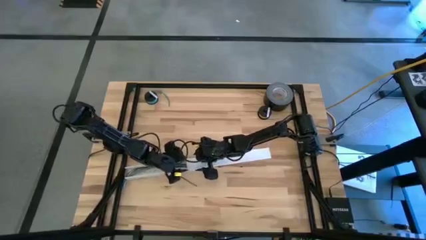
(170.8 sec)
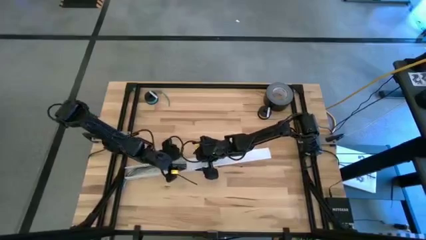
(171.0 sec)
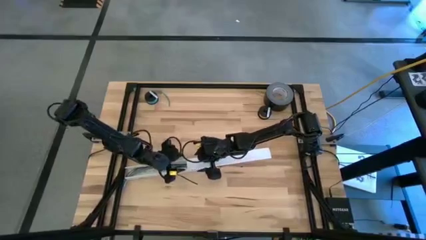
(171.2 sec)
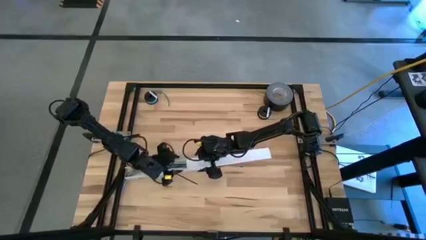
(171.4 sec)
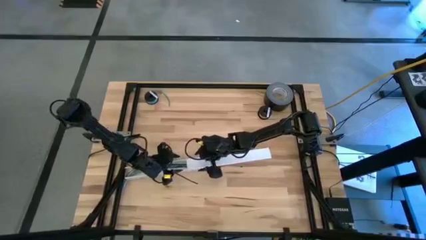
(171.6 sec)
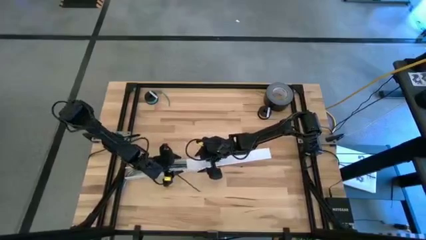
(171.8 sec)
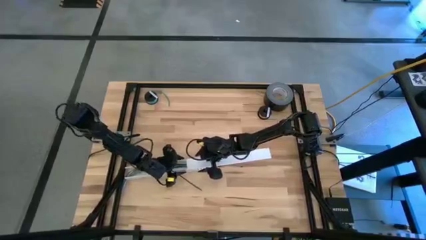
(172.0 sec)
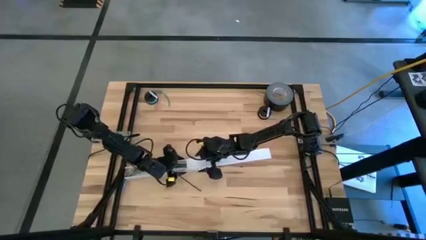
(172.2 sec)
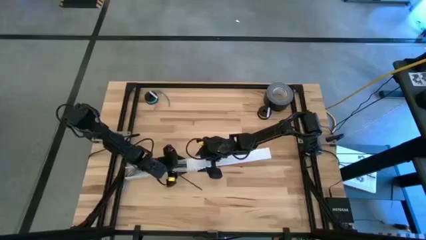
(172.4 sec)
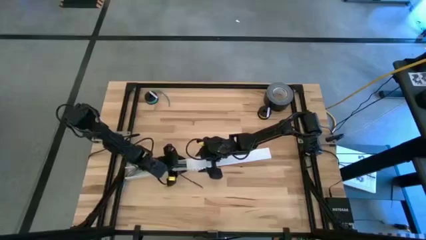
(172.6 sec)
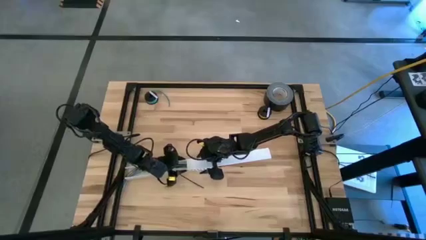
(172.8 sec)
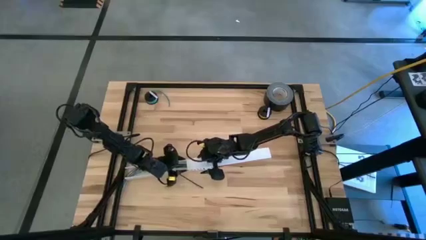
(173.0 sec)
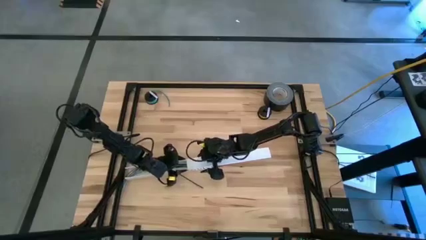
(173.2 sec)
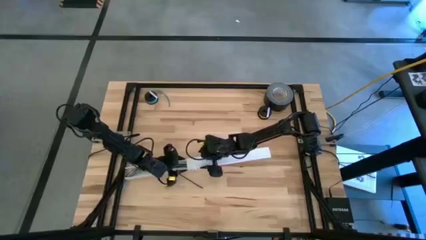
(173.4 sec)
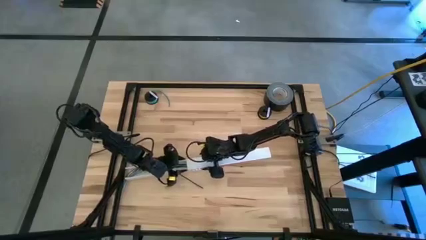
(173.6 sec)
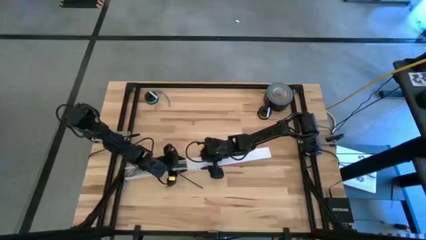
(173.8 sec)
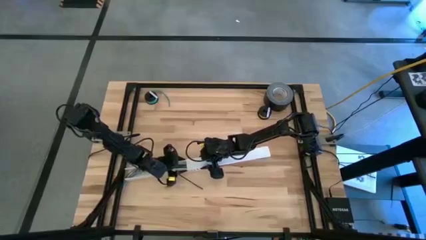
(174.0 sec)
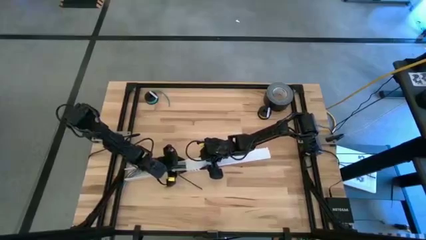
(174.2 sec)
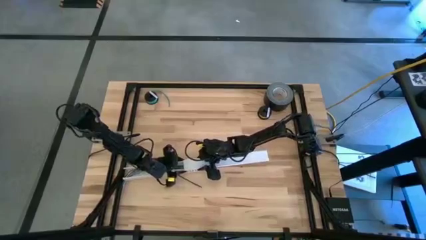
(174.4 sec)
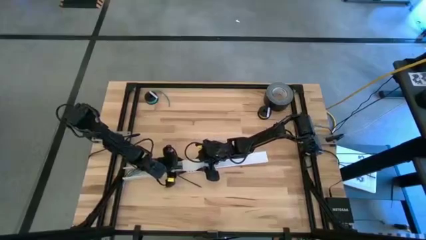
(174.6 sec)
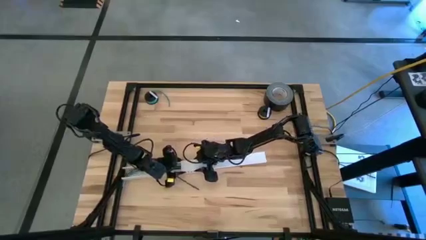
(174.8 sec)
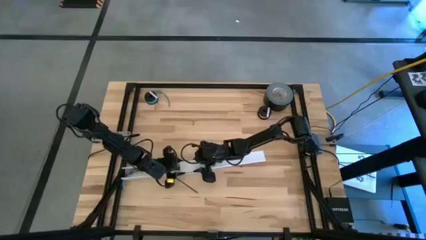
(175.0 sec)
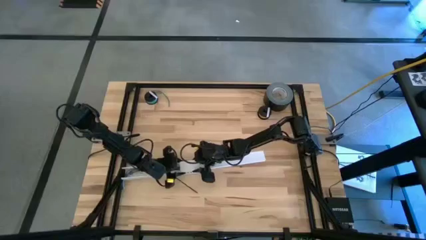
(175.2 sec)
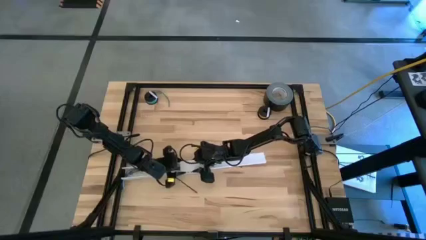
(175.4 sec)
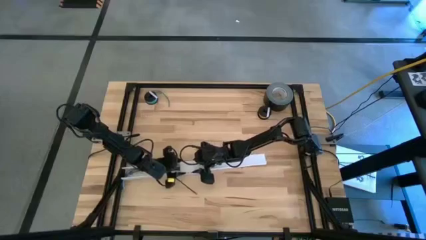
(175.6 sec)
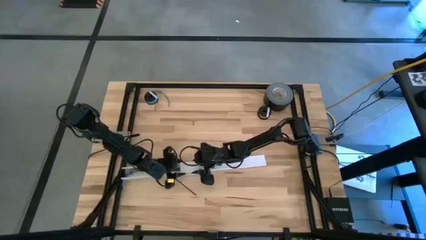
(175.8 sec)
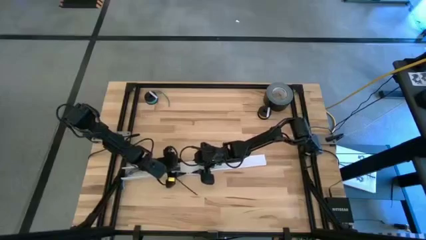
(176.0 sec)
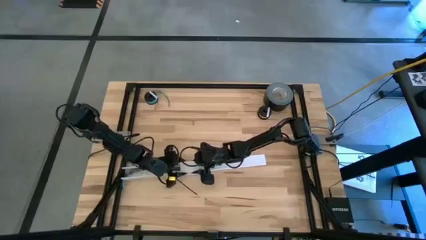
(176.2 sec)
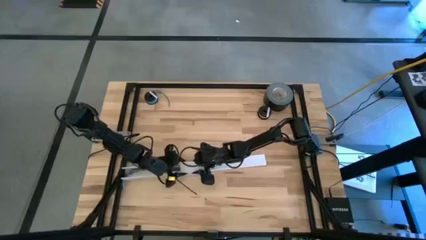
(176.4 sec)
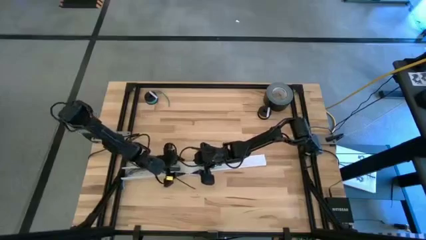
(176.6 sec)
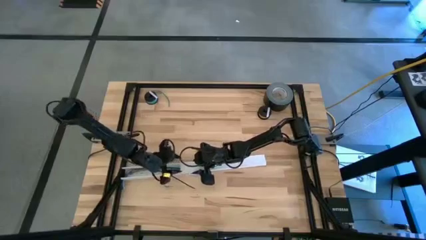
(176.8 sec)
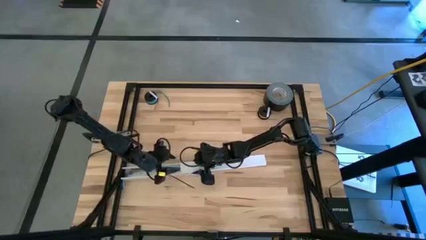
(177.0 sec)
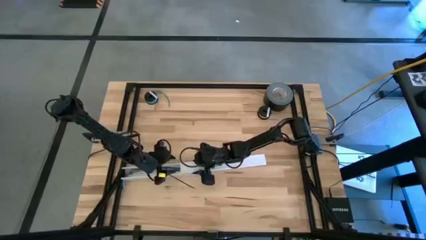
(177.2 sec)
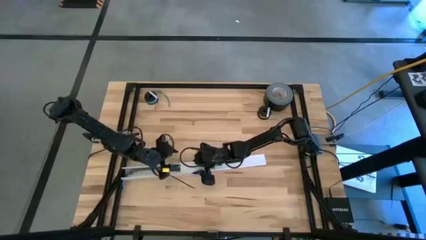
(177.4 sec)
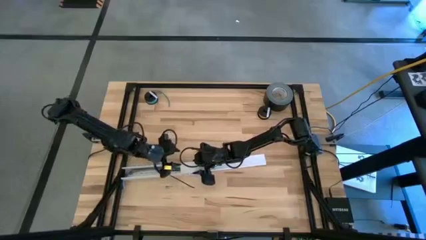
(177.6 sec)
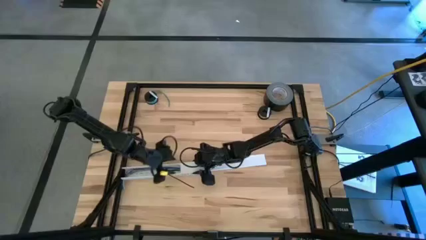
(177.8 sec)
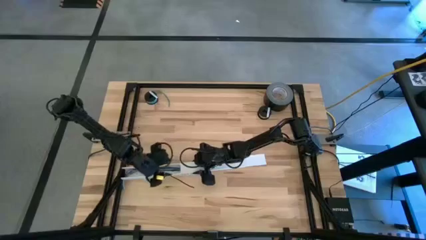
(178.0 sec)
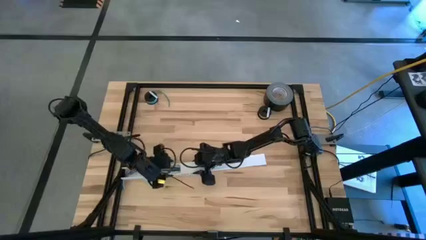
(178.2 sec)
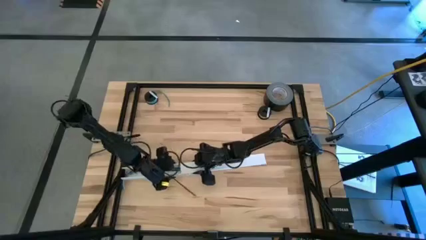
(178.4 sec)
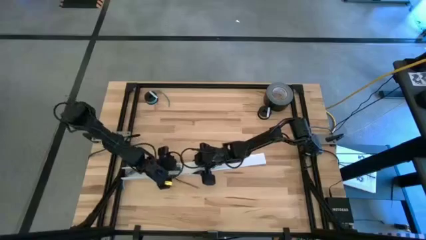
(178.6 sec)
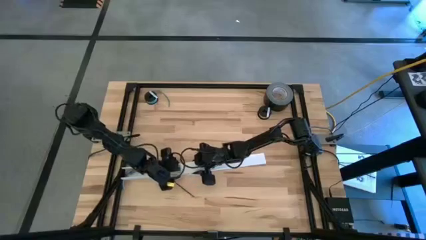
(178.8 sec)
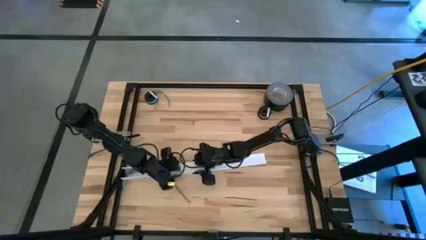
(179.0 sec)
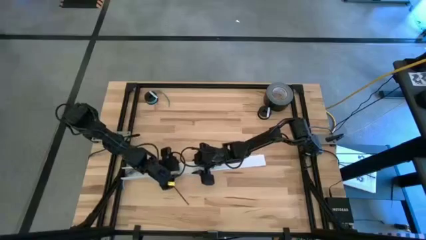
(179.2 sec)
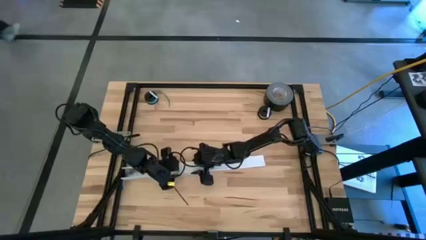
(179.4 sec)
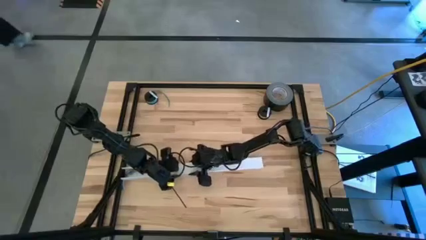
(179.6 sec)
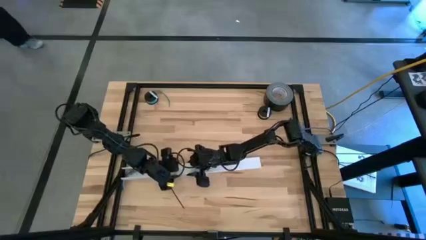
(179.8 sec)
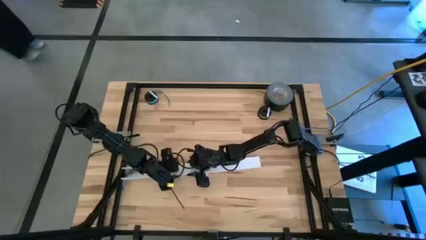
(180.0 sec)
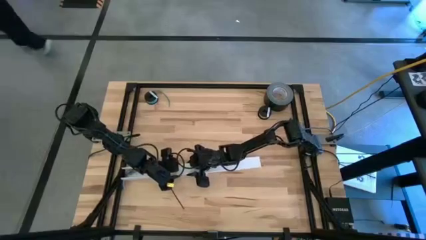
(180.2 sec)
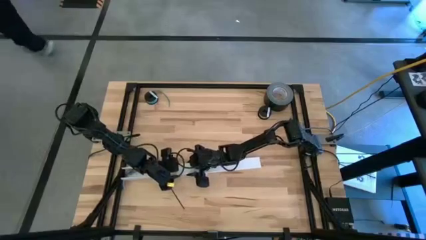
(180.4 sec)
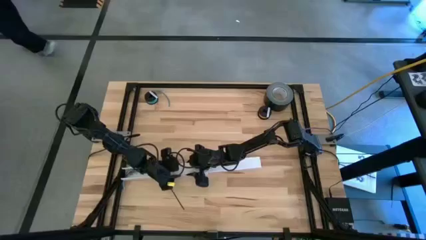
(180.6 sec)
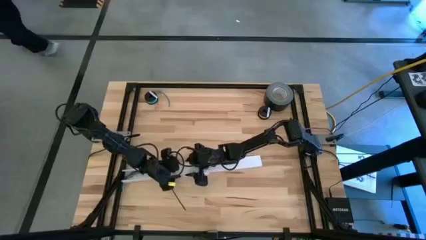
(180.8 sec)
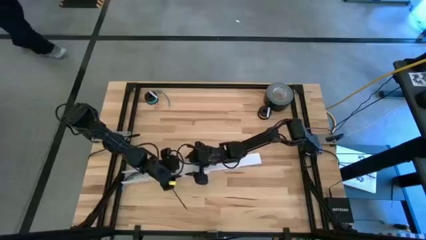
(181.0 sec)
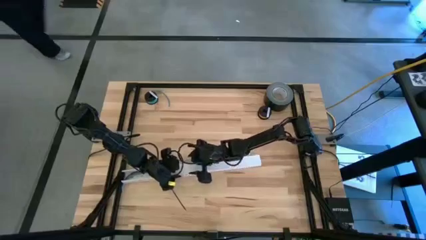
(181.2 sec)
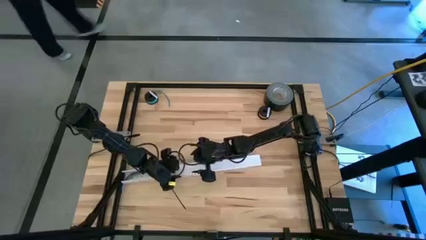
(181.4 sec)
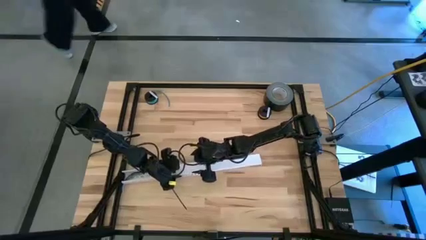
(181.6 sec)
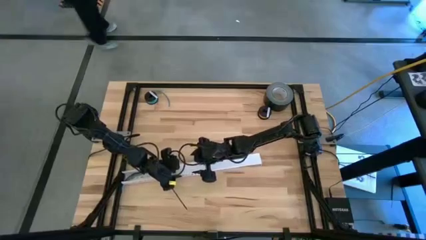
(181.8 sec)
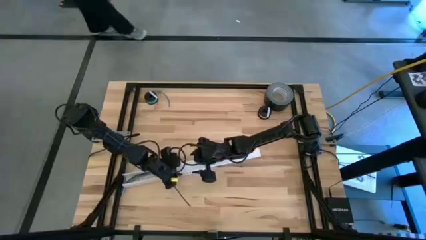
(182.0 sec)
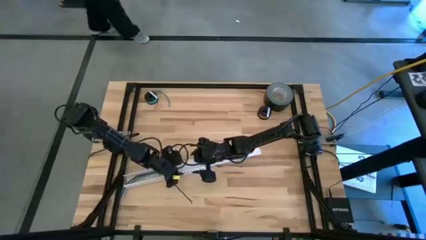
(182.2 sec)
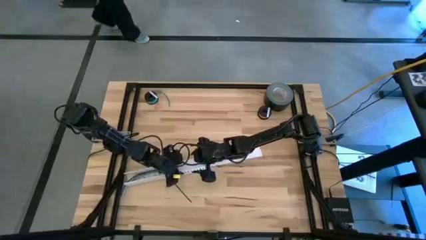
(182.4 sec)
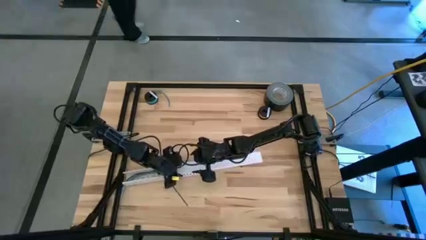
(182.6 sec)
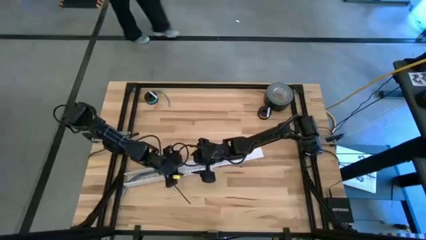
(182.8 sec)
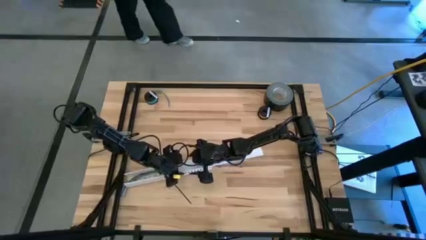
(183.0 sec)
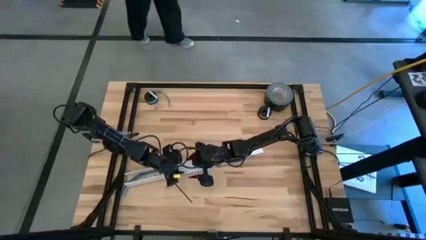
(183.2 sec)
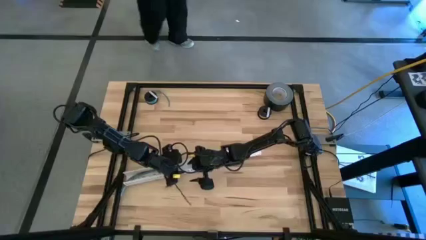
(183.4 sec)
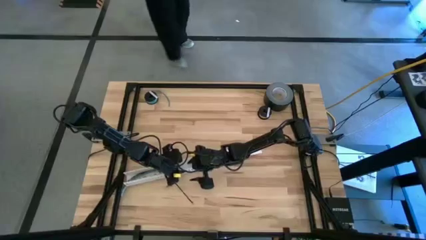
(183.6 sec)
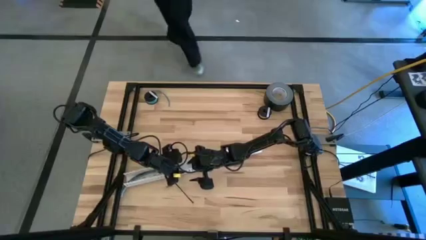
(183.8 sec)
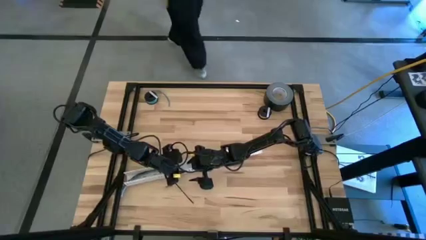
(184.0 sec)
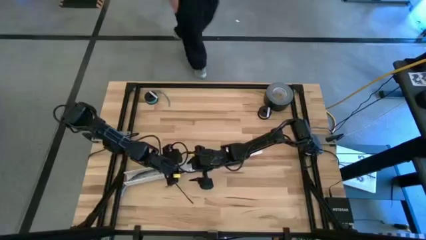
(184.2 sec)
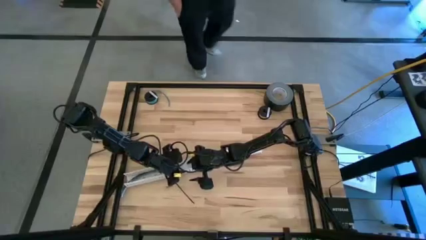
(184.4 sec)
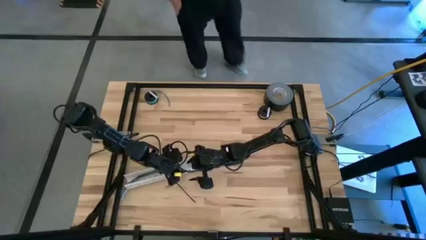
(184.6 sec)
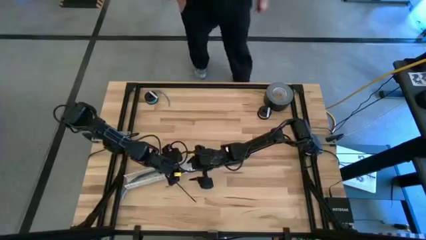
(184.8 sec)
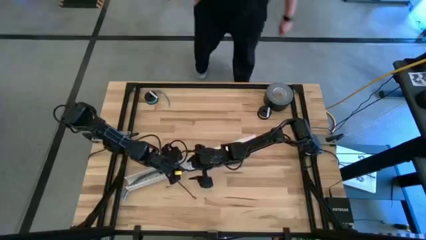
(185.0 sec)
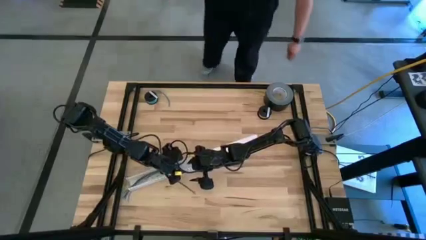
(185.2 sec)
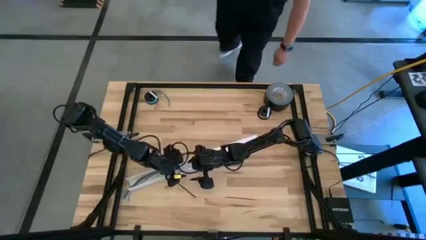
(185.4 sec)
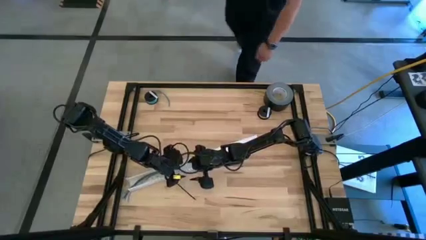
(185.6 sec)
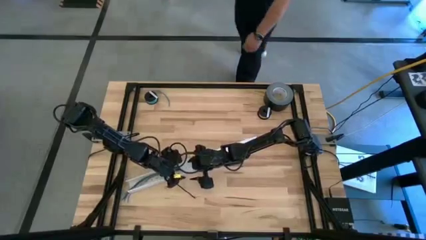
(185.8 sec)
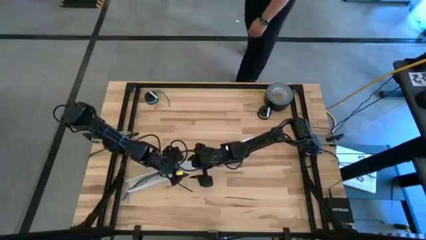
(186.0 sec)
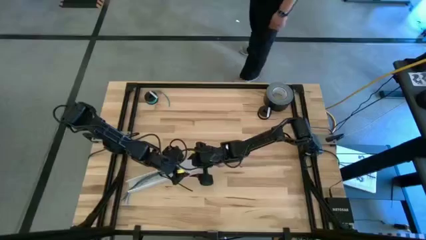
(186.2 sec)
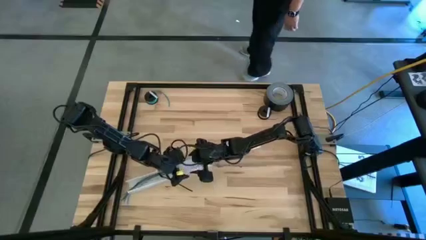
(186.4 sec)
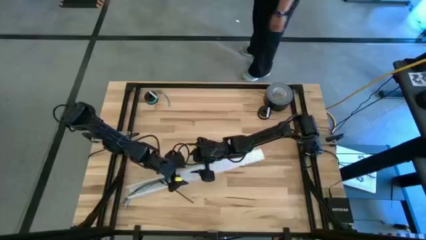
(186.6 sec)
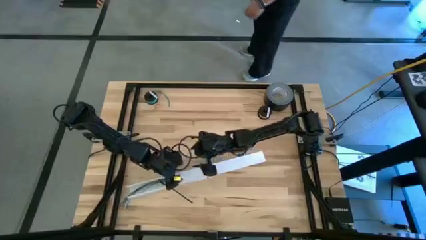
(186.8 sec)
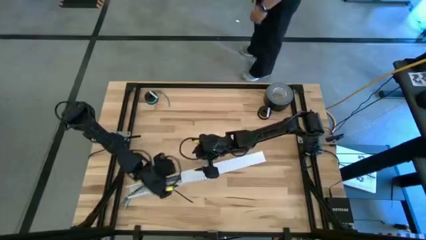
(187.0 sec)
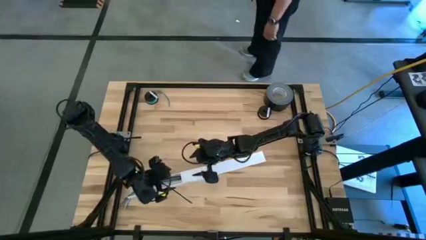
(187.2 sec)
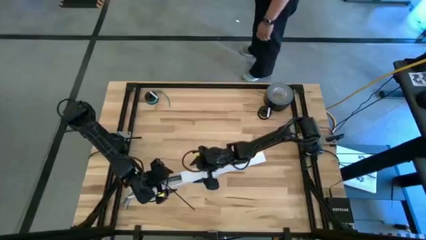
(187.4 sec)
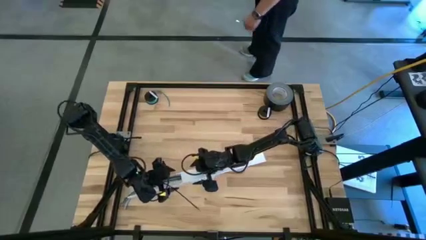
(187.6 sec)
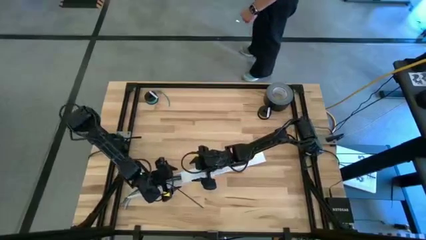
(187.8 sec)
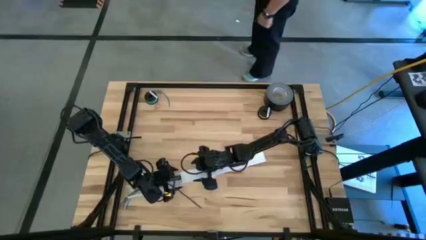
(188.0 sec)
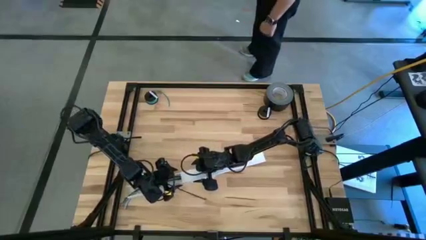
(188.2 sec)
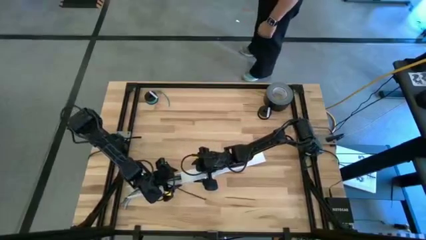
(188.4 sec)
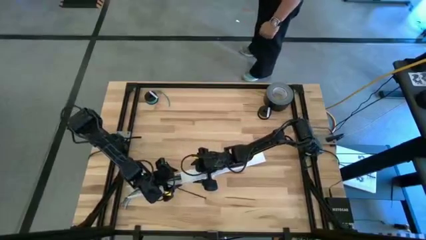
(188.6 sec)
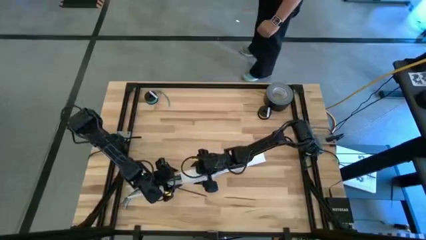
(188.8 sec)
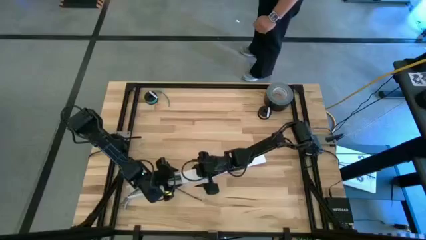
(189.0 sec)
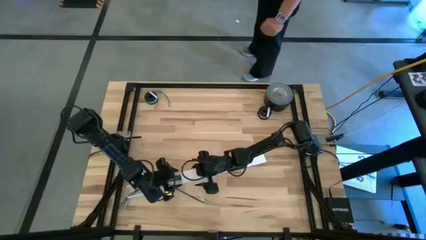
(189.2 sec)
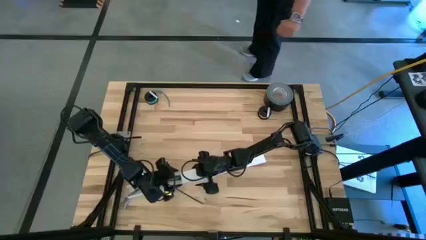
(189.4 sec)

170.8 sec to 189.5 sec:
Task: Ziptie cables
Close the white cable duct
